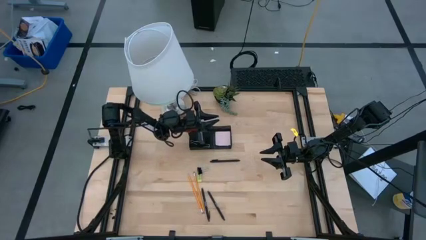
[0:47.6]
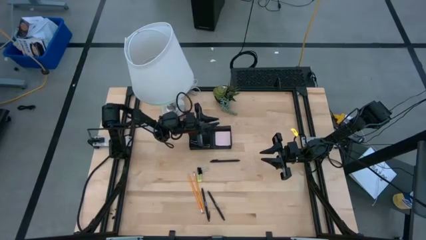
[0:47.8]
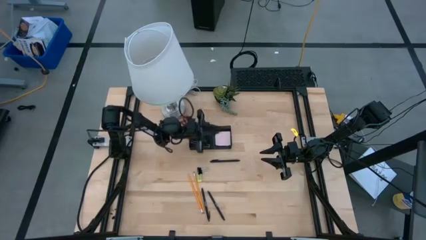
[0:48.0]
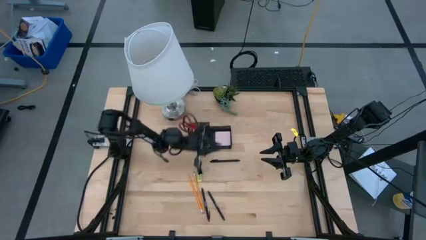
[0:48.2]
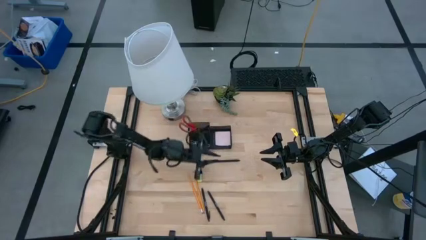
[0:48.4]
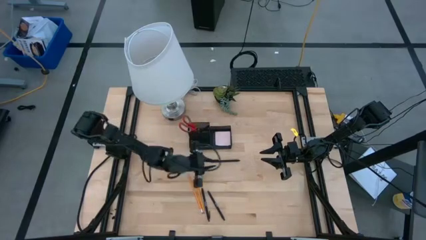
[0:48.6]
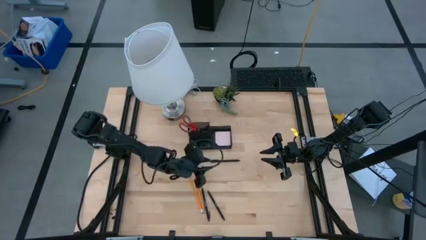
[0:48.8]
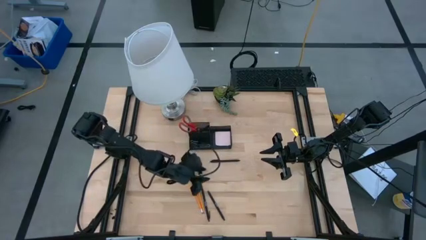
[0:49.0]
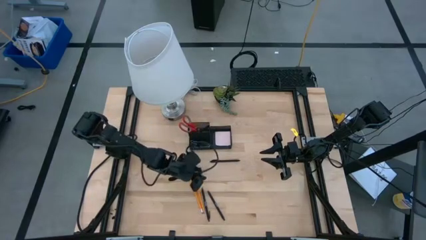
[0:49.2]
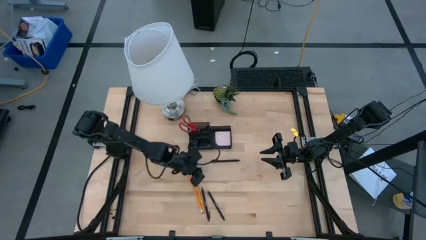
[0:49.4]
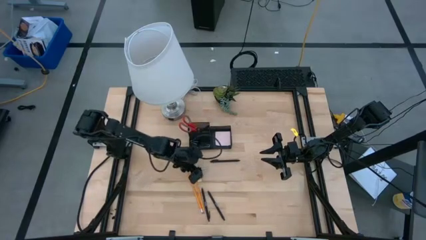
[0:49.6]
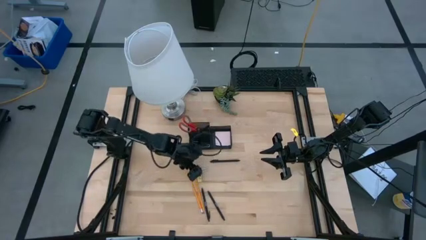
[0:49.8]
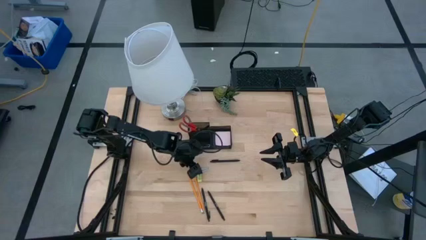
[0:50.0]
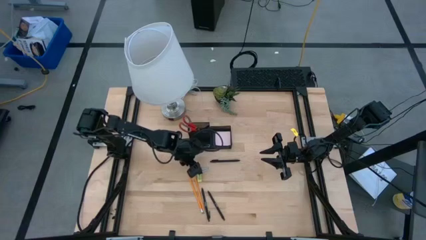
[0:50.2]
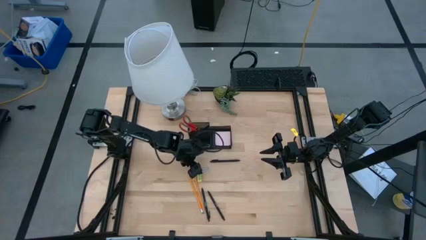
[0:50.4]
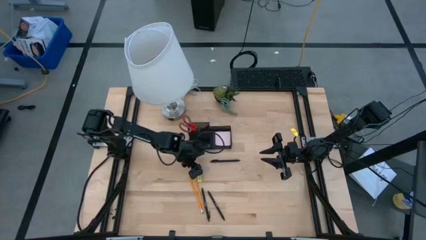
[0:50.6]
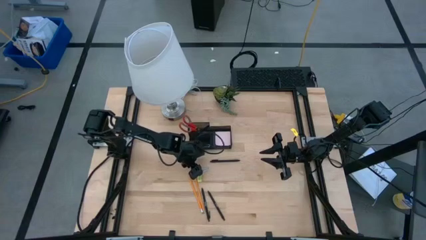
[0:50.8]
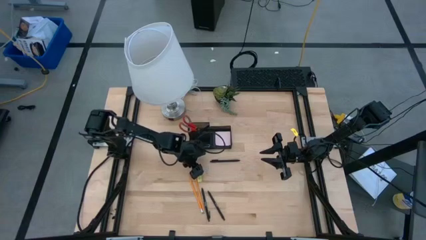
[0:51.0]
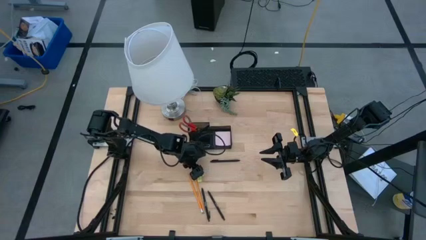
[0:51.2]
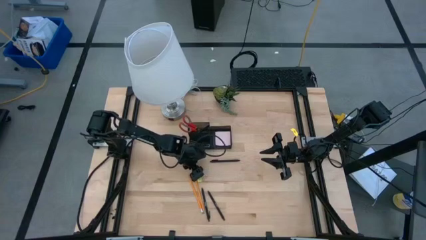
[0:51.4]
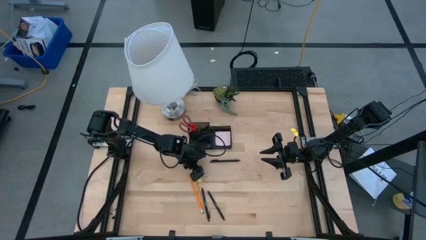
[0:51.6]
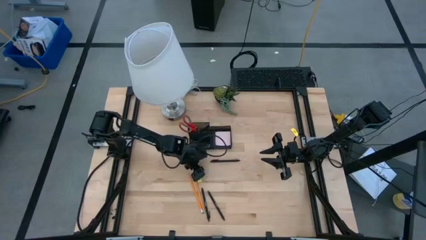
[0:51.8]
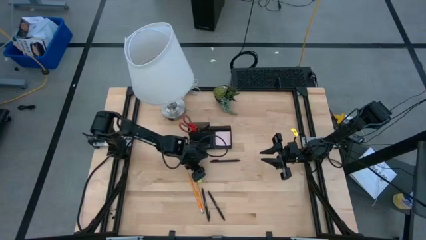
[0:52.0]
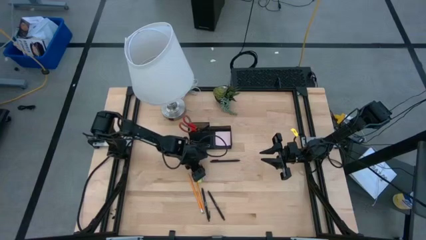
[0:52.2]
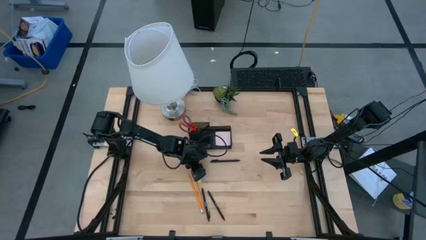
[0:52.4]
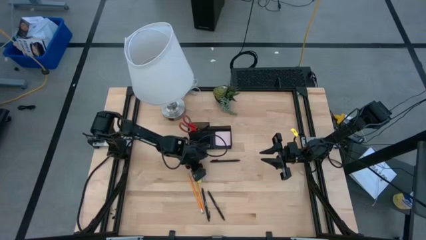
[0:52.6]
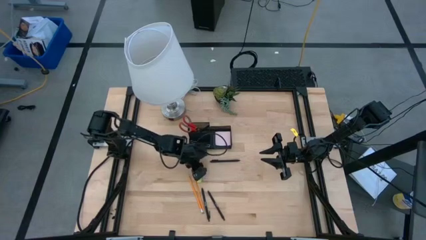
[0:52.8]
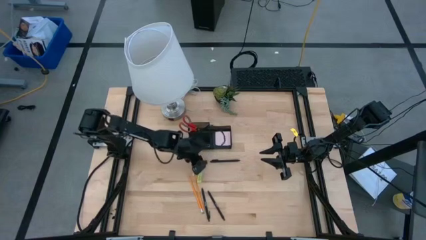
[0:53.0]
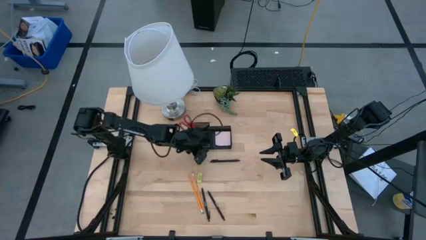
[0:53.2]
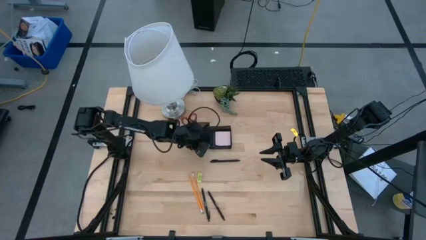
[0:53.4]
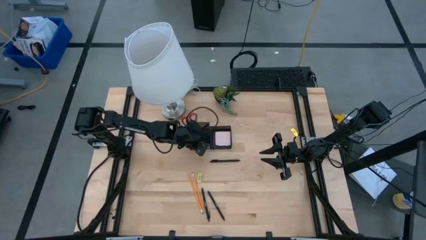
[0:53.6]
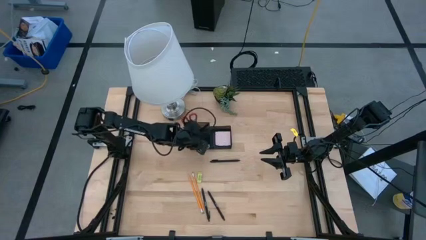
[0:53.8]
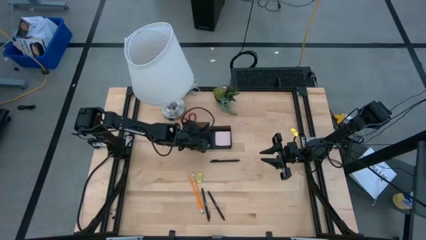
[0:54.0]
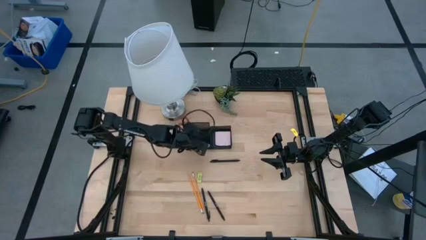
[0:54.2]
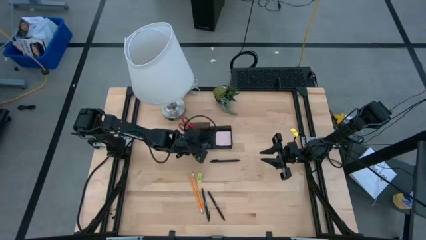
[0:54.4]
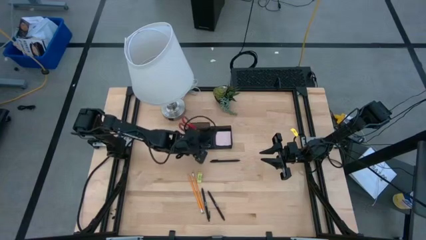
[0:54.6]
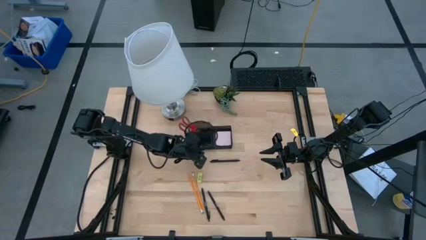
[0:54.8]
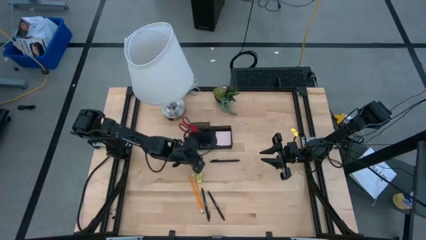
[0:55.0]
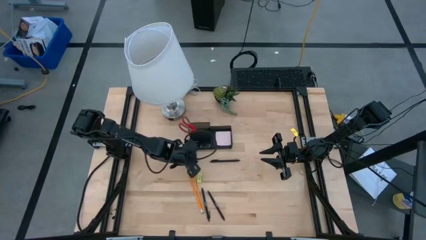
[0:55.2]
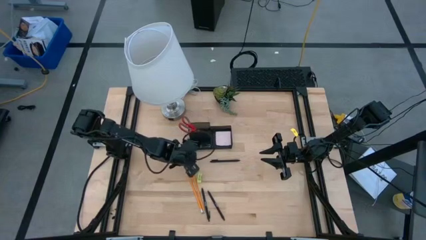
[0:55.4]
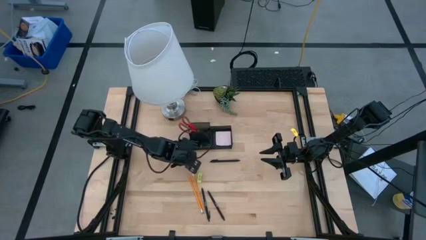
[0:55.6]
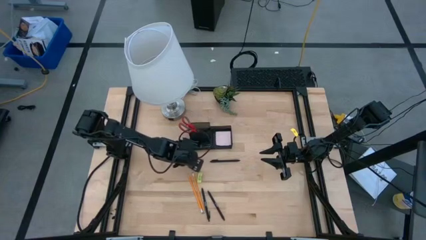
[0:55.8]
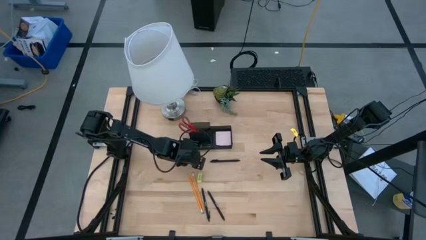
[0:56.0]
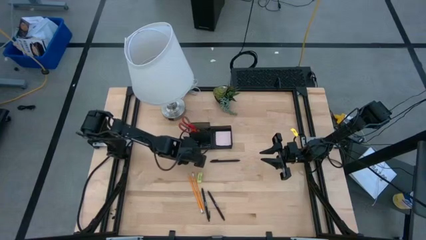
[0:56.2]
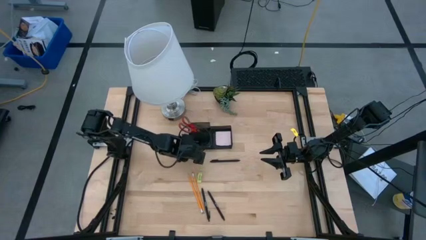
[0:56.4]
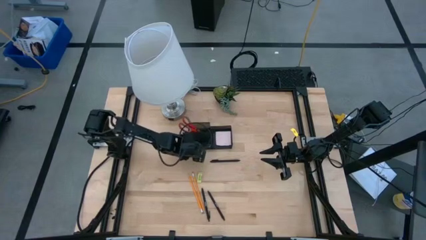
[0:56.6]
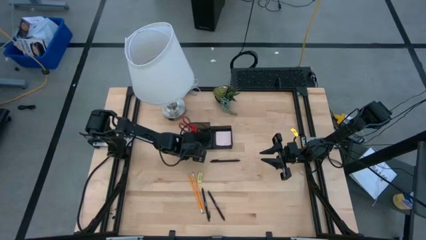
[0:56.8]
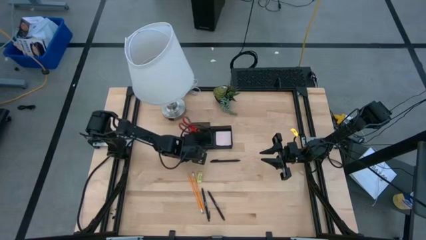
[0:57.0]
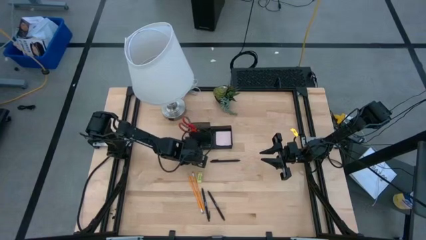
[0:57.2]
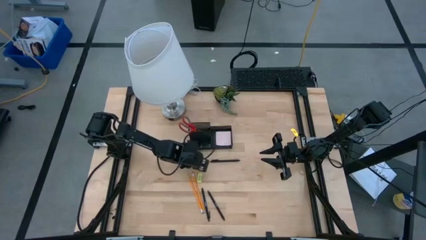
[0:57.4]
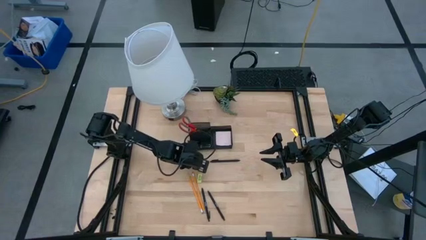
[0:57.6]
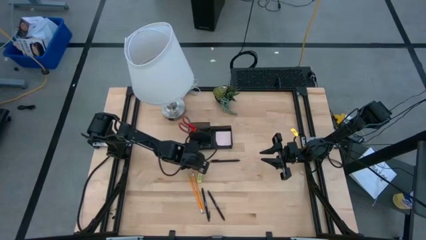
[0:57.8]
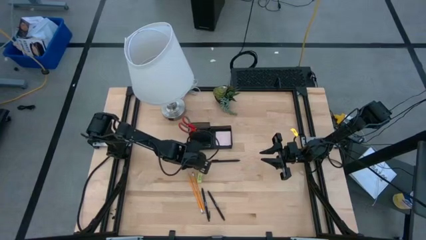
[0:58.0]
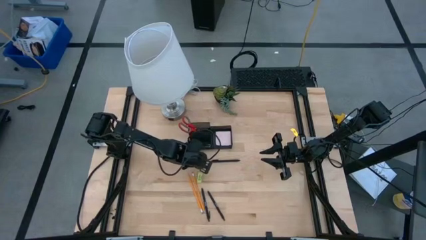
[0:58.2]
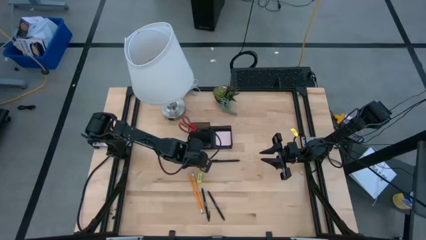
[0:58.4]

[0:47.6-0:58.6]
Task: Pick and place office supplies into organizer
Put the black binder clip into the black desk organizer

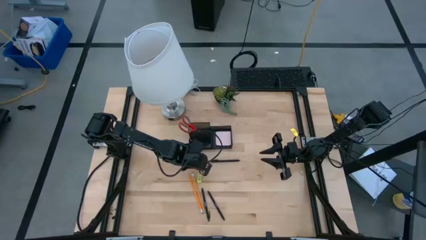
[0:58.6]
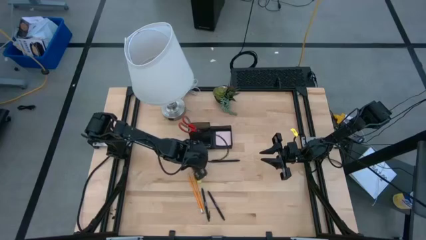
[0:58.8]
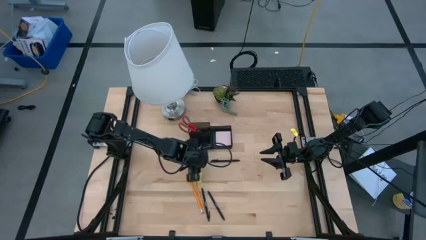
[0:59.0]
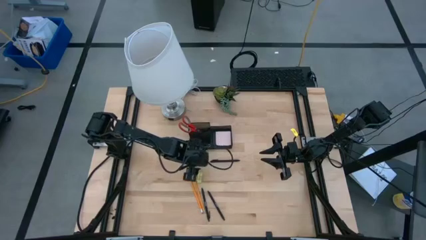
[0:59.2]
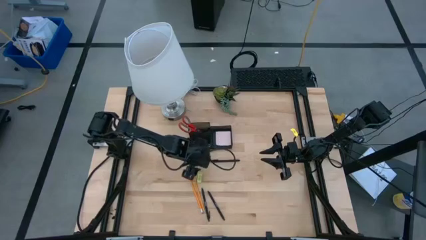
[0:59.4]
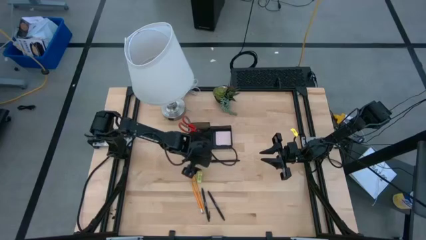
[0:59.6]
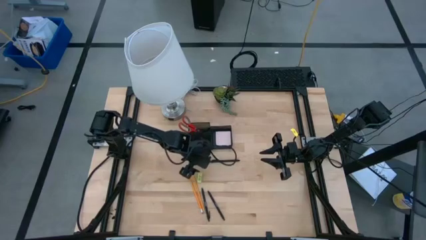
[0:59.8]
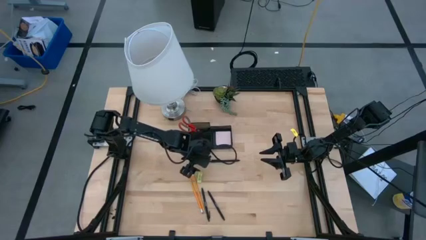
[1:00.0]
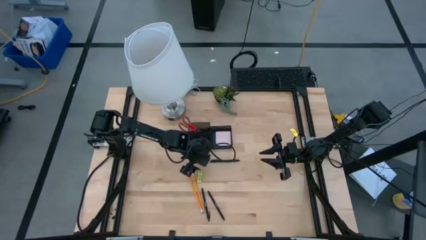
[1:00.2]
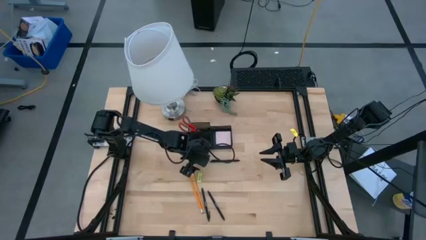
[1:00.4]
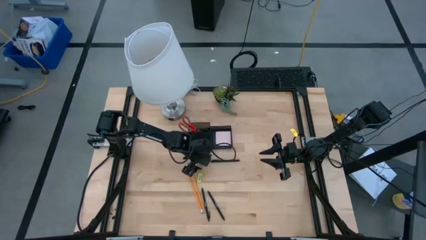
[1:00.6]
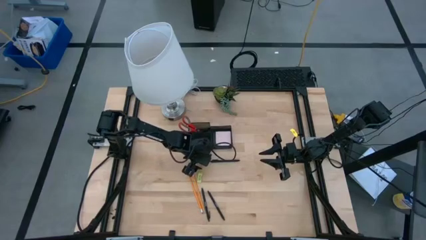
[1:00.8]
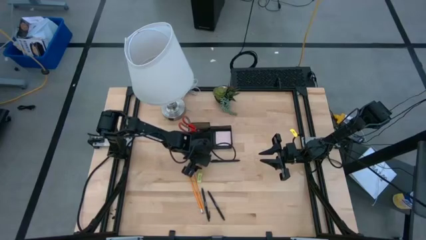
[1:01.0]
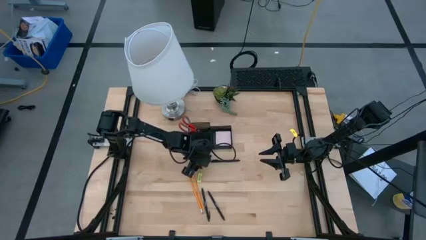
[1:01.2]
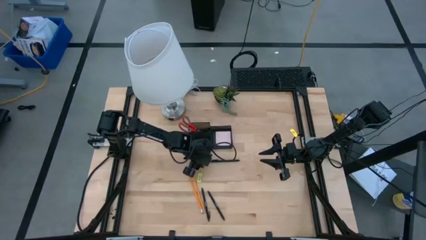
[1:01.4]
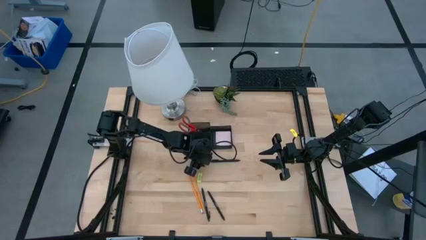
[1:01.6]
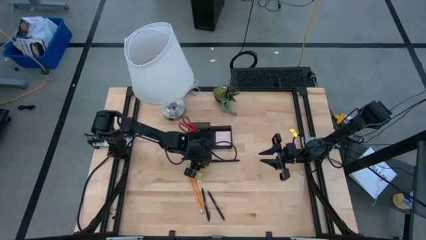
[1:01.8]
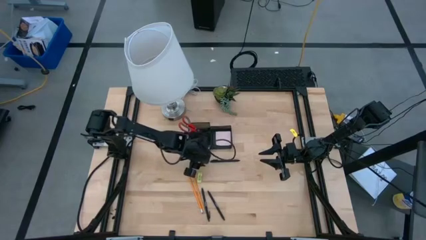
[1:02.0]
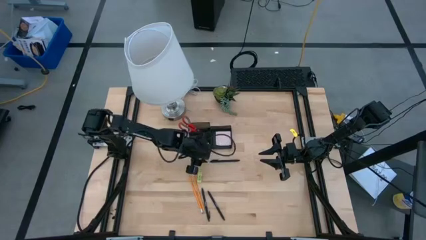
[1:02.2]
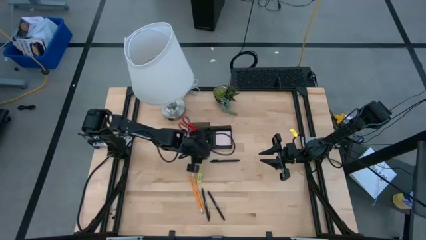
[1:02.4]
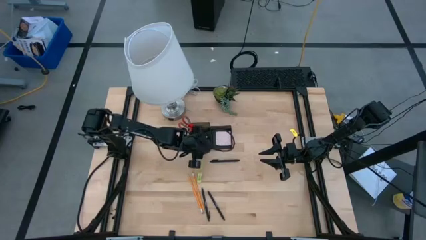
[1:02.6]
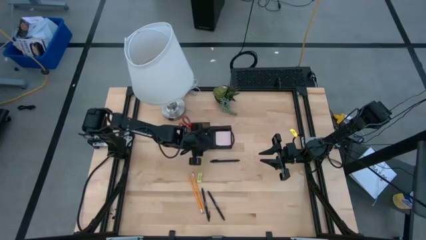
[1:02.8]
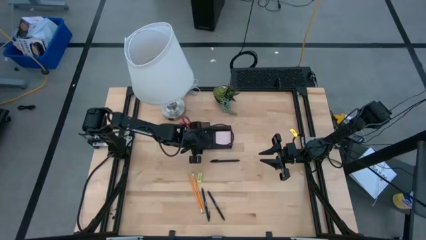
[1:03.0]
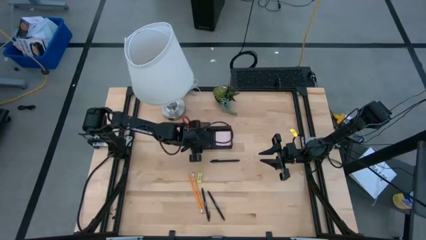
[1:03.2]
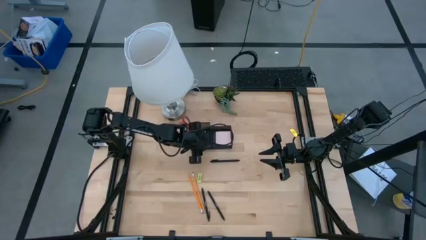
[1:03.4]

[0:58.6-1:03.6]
Put the black binder clip into the black desk organizer
